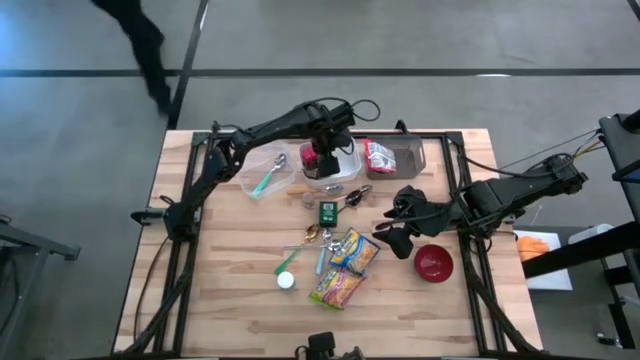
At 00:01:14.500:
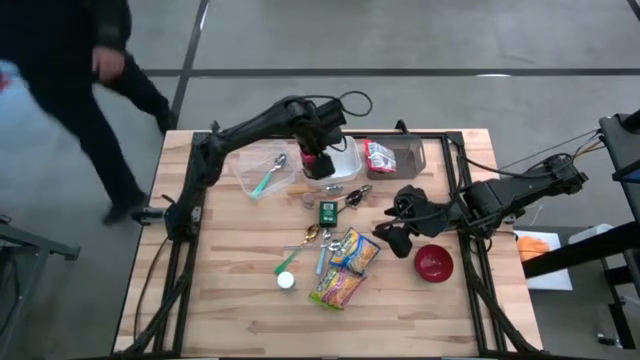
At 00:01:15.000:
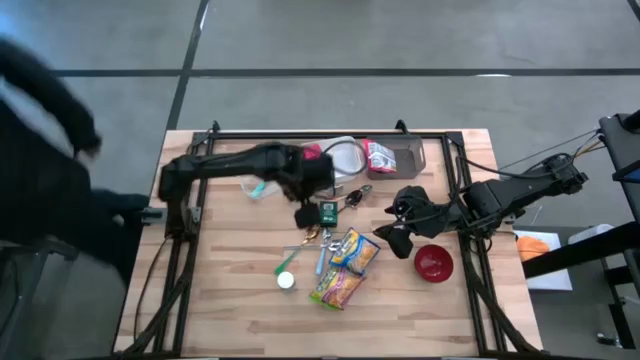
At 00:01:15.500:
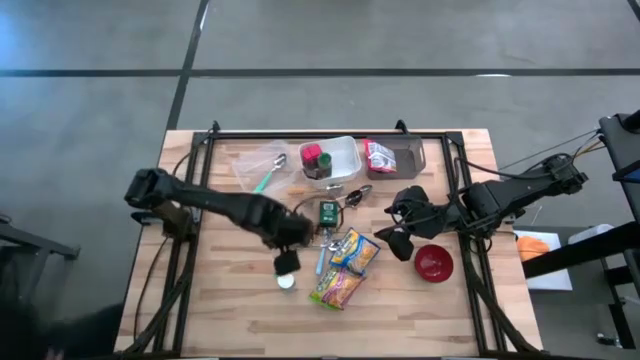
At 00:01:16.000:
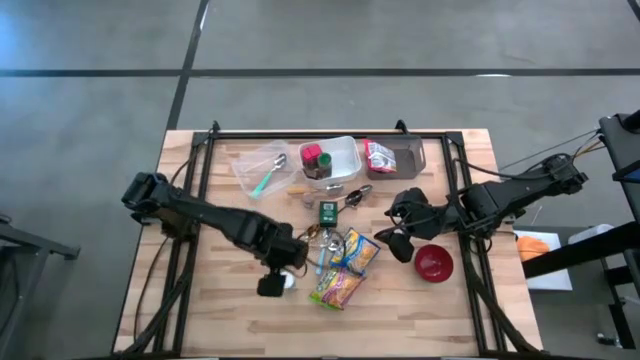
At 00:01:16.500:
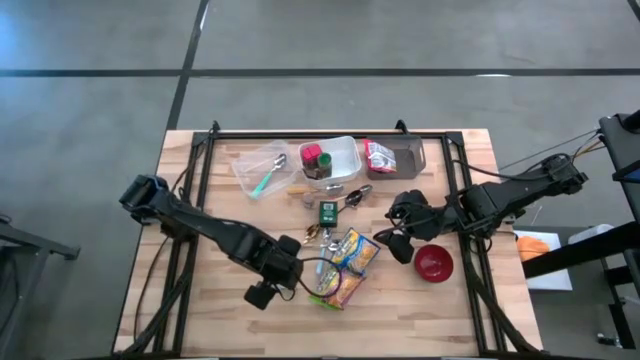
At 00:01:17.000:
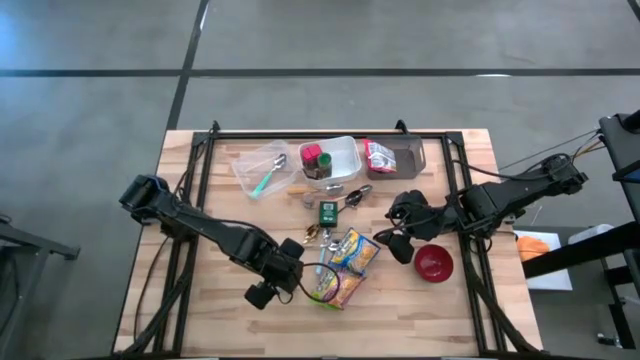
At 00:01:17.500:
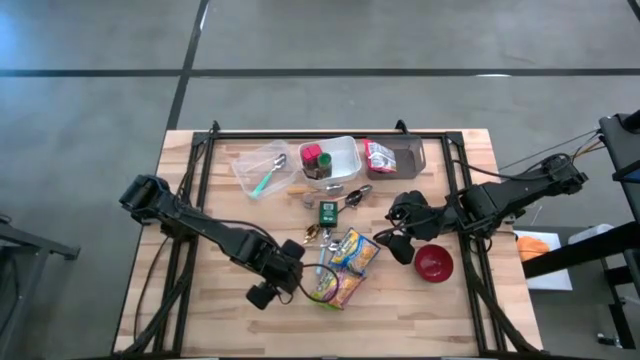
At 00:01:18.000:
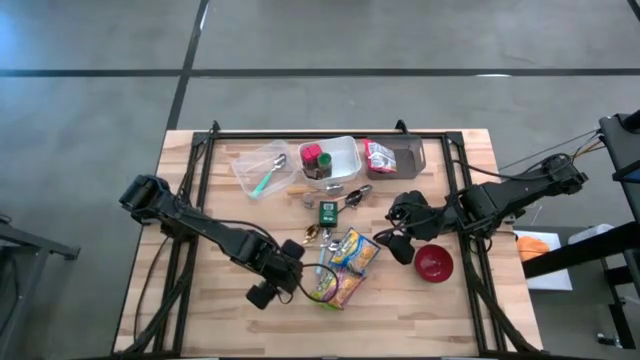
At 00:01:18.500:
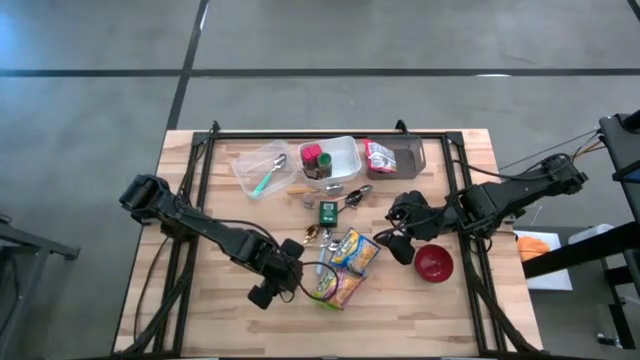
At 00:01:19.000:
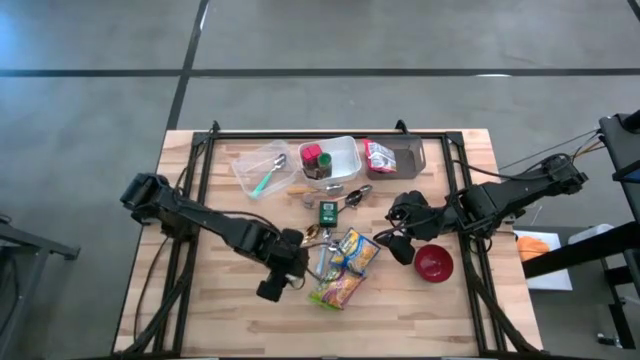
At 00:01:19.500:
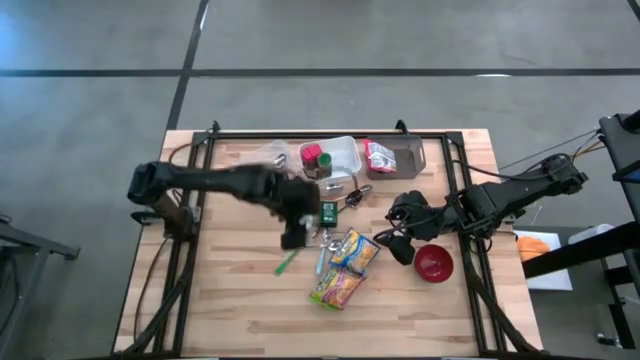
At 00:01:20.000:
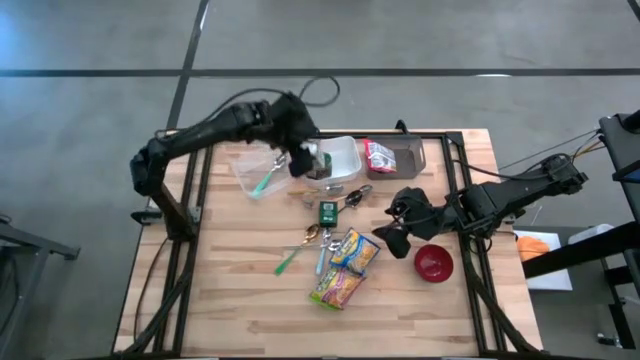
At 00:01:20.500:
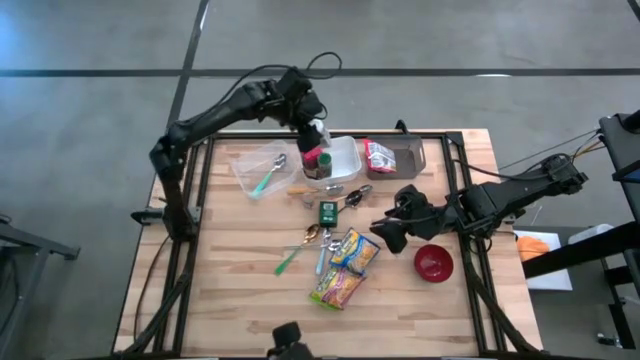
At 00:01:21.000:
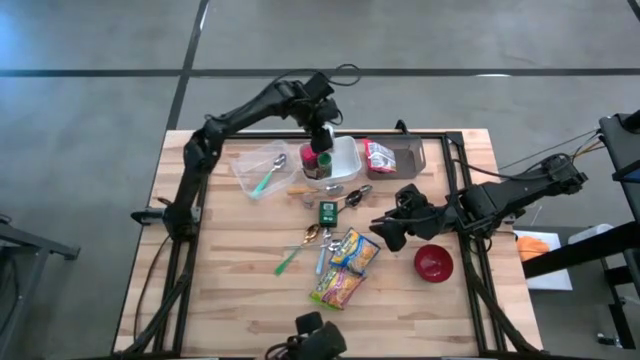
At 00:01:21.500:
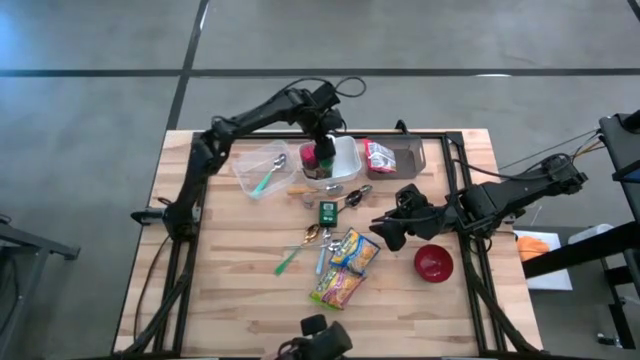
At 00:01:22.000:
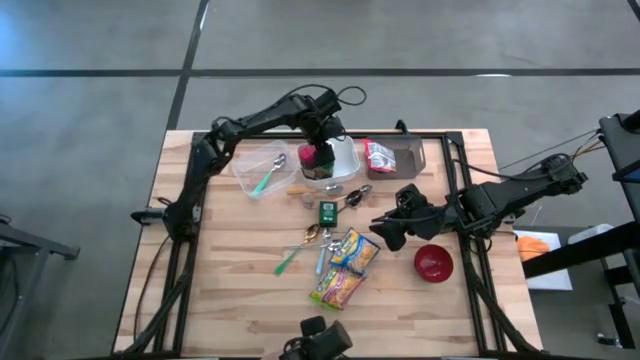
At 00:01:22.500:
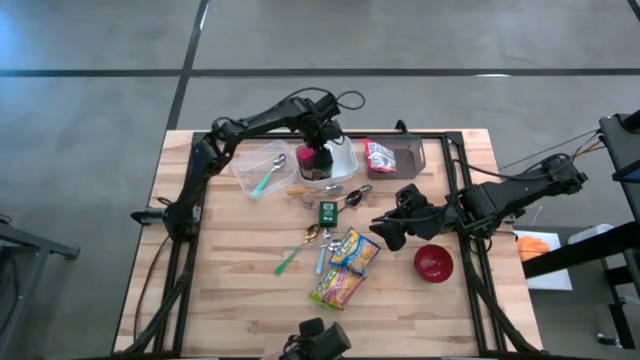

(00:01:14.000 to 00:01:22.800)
Put the white seasoning bottle into the white bin

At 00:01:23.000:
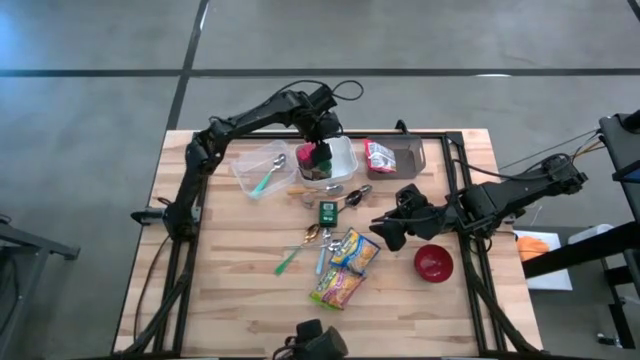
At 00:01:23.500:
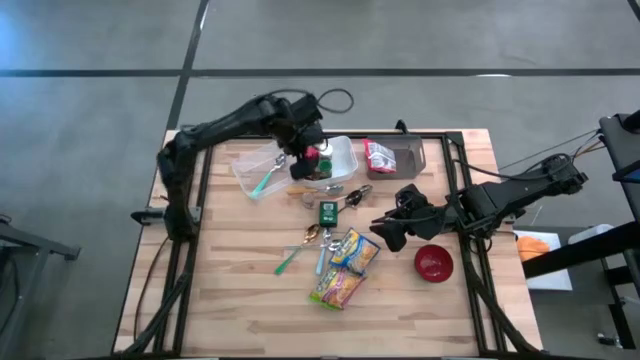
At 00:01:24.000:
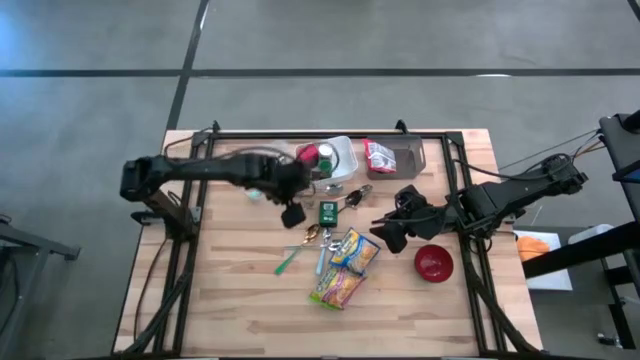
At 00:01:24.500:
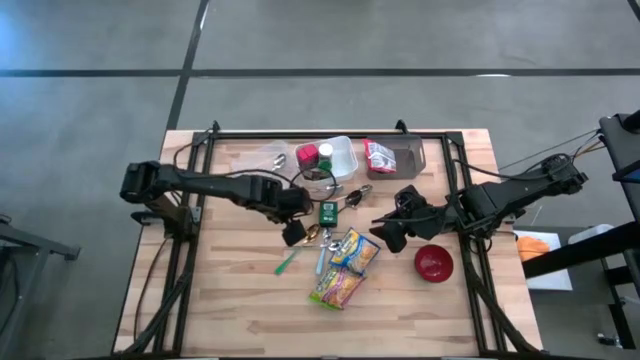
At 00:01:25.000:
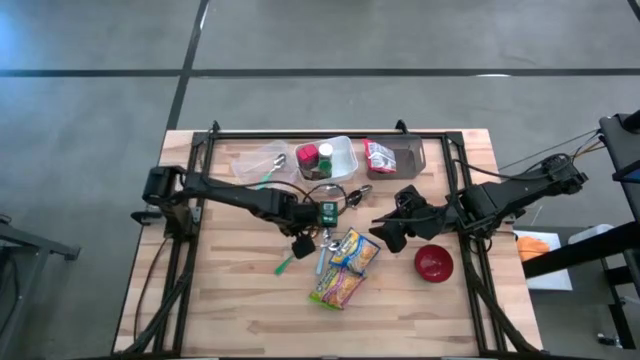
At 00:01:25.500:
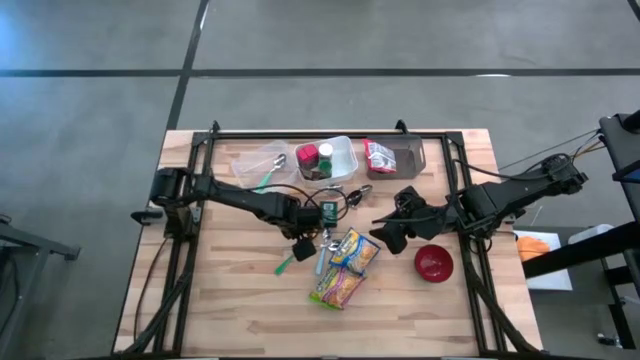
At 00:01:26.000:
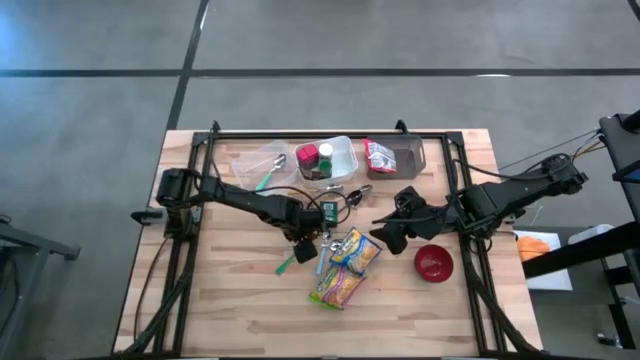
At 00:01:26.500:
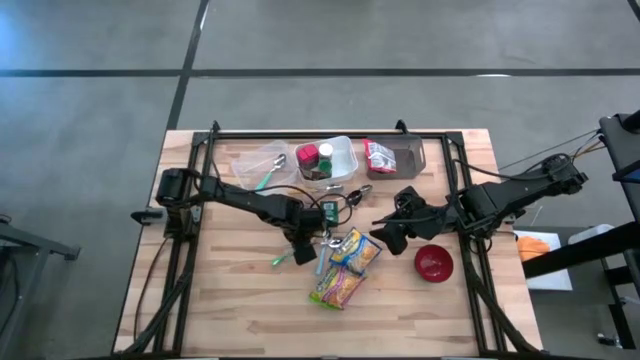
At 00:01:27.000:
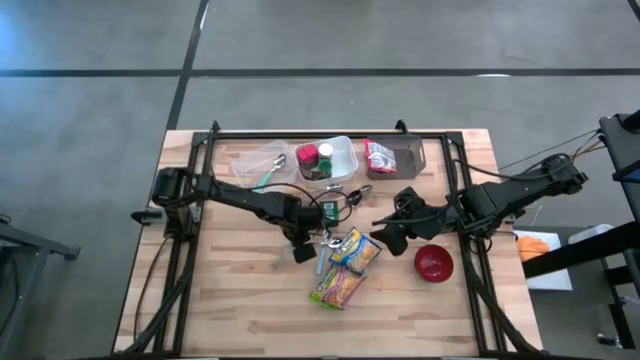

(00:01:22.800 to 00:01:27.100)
Put the green spoon into the transparent bin

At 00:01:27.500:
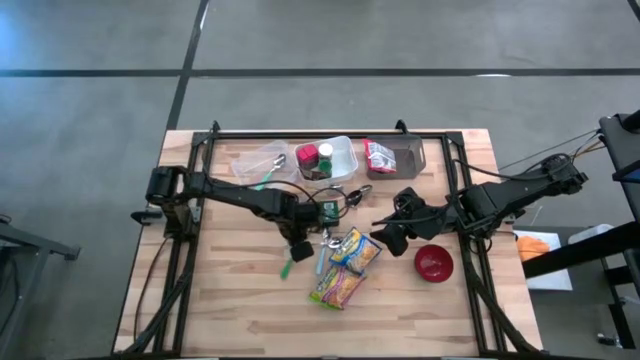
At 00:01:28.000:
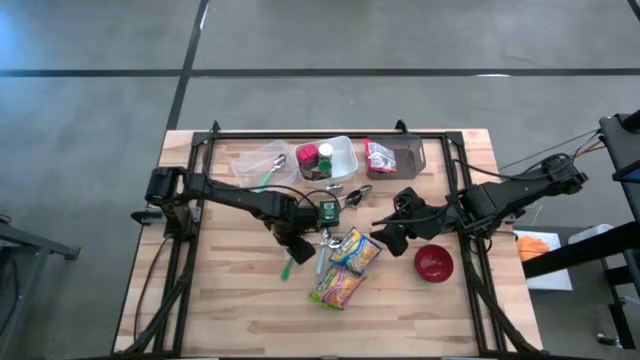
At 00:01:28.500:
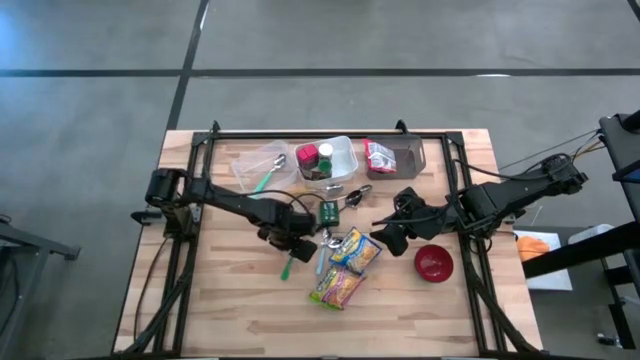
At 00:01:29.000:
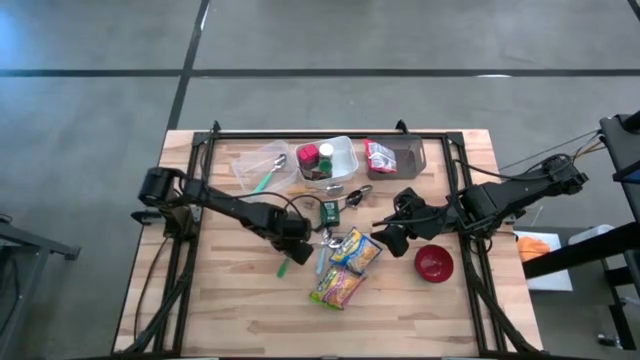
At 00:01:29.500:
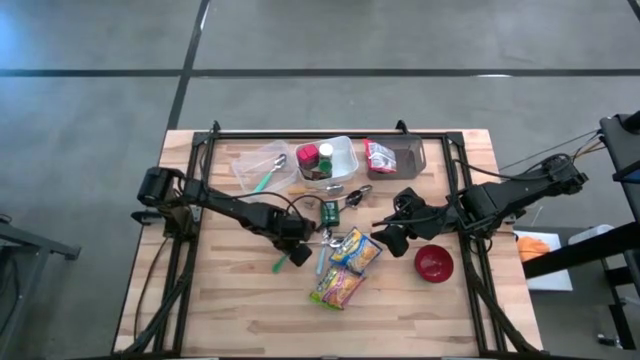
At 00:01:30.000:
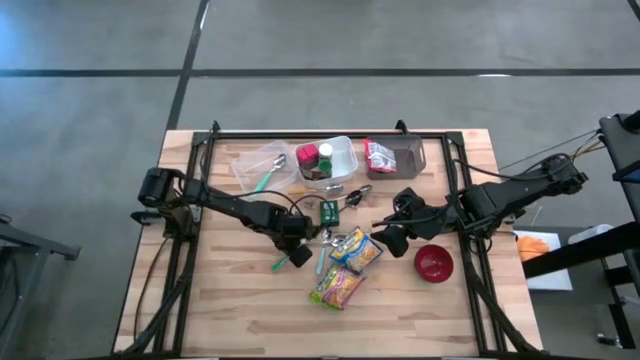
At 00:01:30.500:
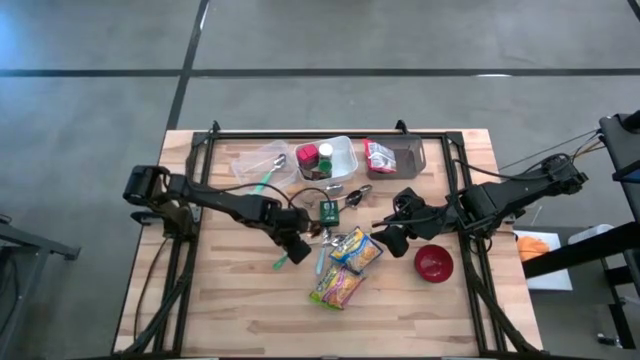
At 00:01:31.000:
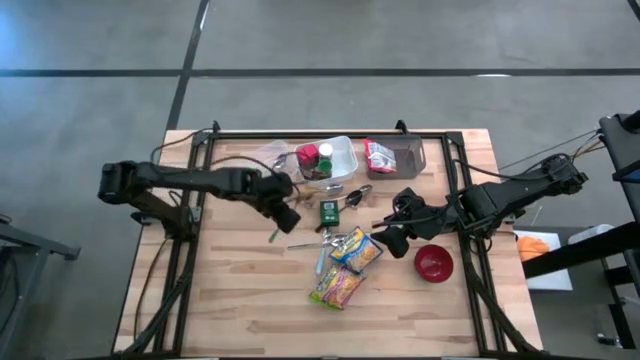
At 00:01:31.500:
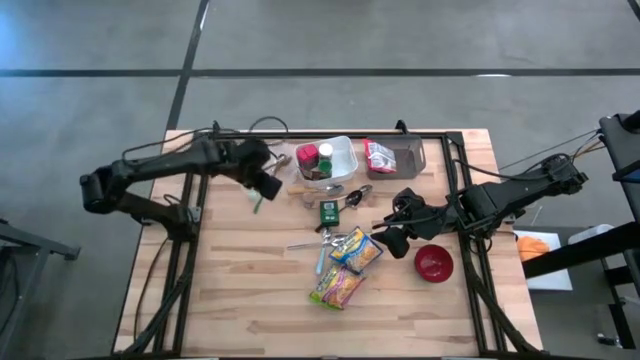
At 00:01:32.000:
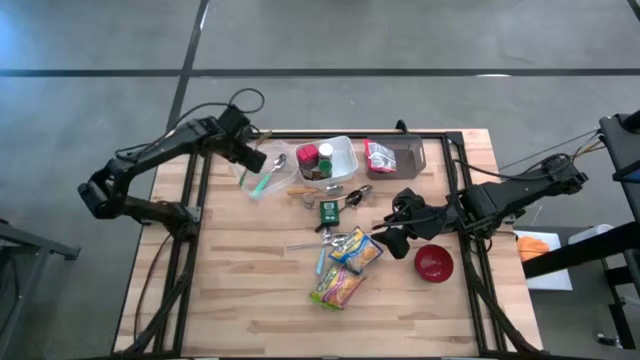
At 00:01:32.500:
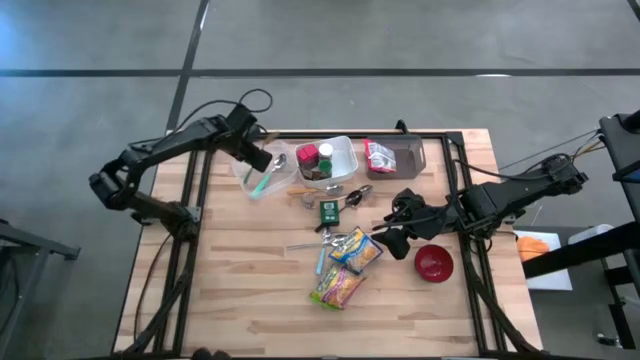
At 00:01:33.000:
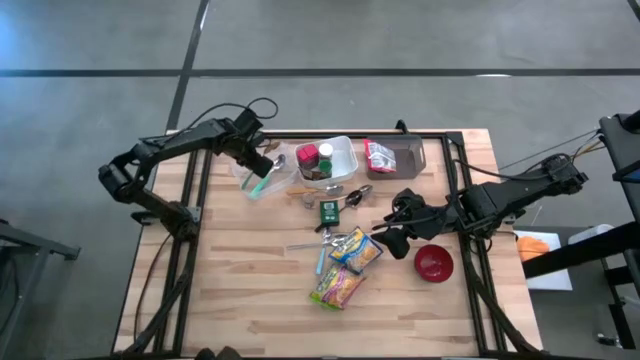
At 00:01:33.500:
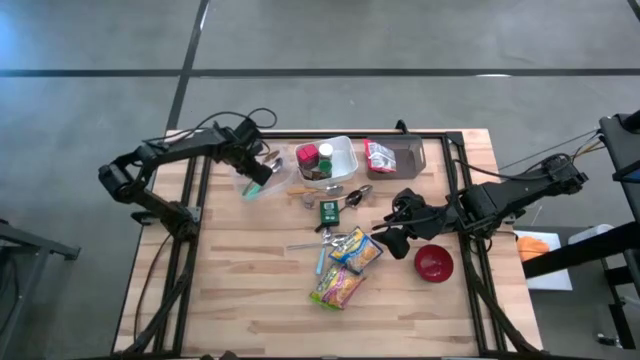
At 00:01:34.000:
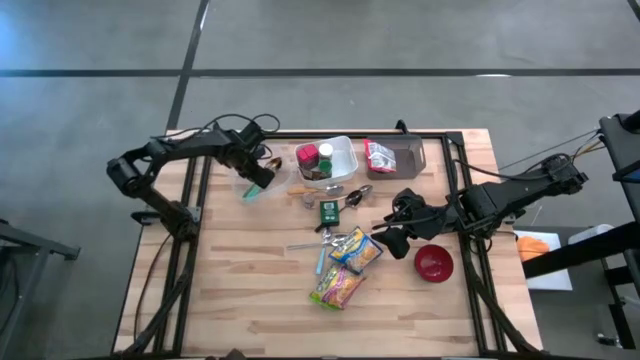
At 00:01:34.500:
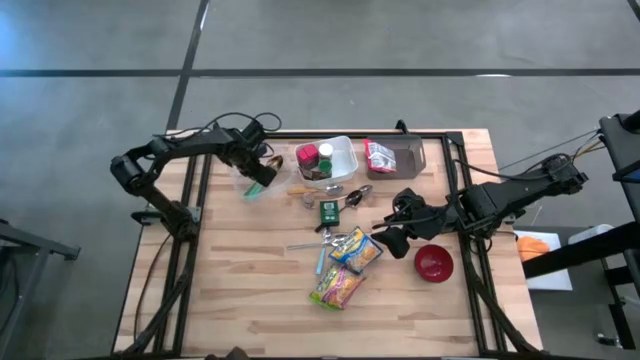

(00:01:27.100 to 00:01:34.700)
Put the green spoon into the transparent bin
